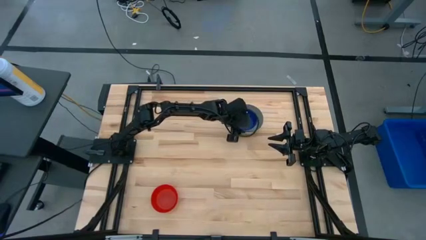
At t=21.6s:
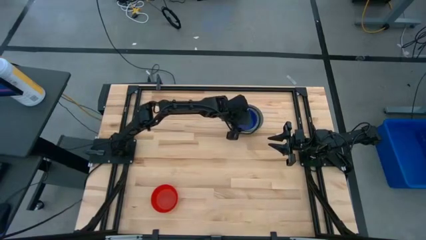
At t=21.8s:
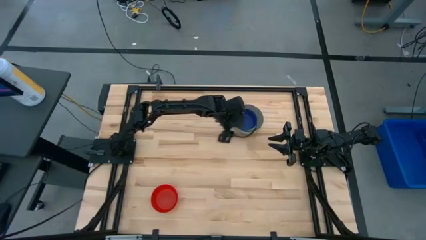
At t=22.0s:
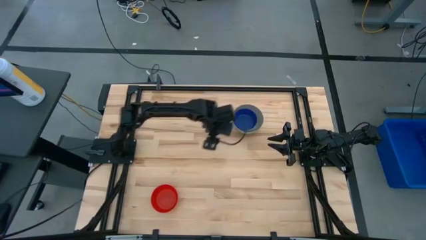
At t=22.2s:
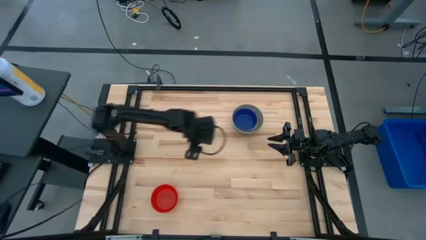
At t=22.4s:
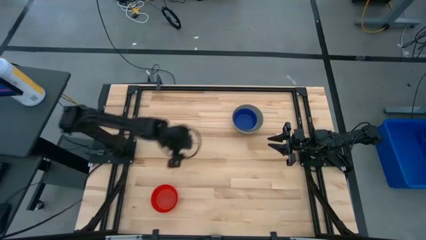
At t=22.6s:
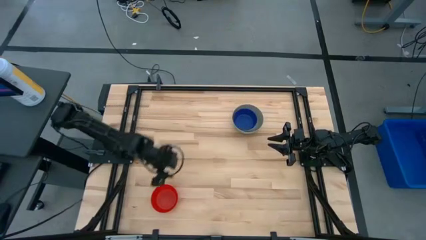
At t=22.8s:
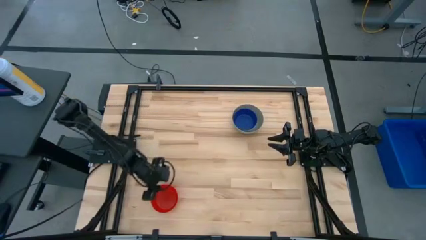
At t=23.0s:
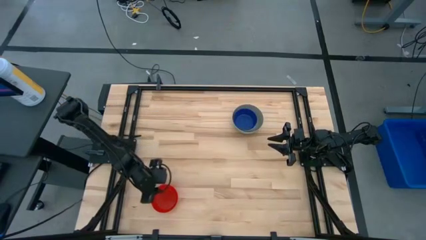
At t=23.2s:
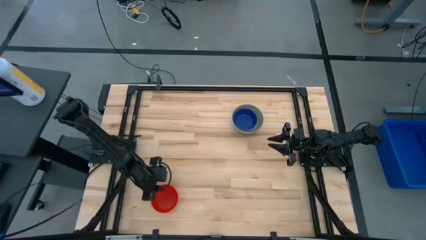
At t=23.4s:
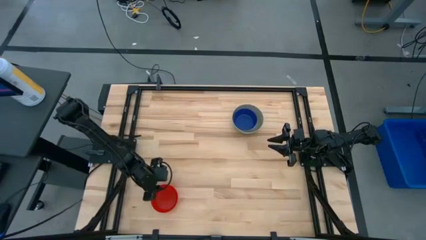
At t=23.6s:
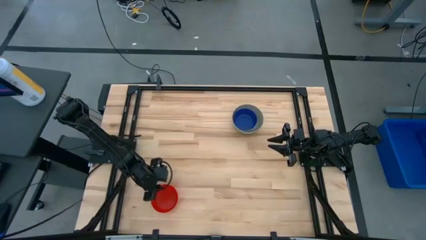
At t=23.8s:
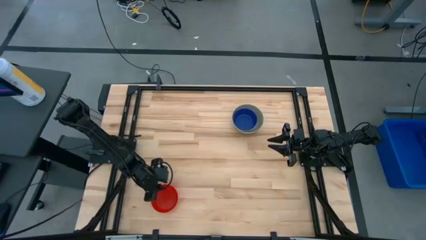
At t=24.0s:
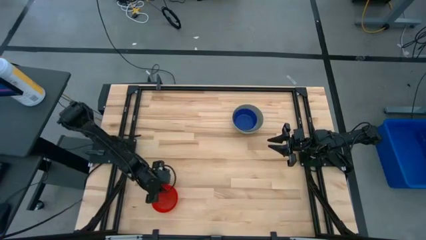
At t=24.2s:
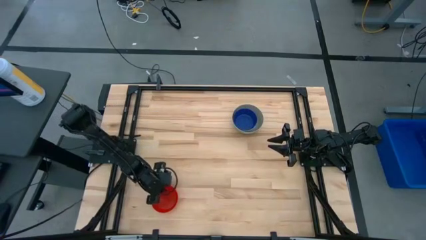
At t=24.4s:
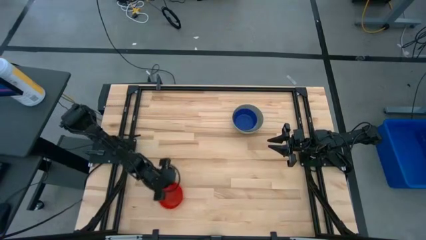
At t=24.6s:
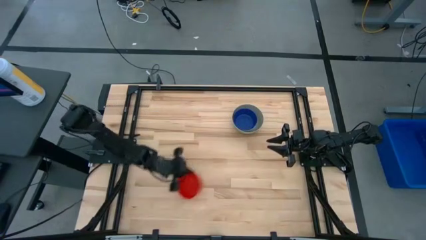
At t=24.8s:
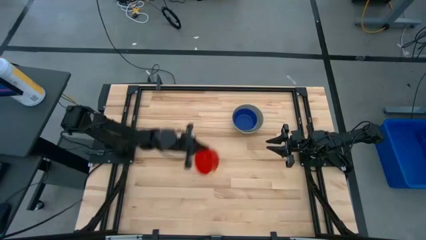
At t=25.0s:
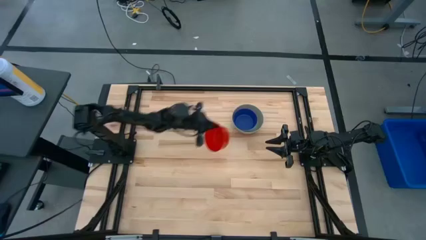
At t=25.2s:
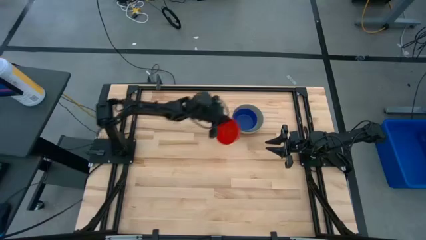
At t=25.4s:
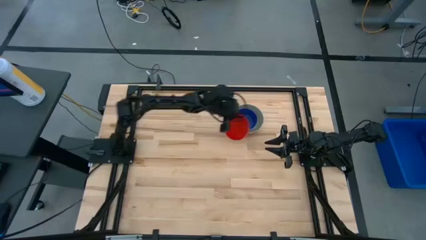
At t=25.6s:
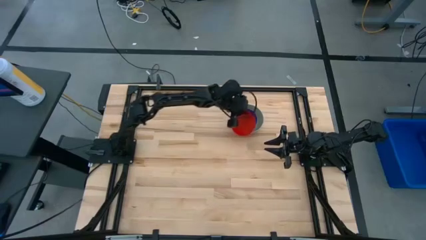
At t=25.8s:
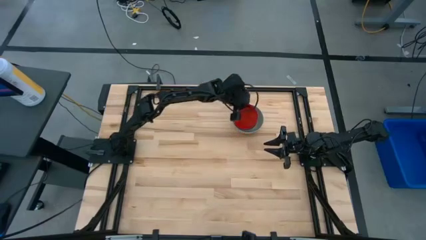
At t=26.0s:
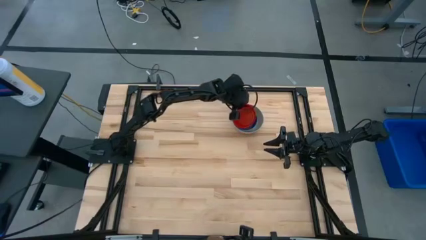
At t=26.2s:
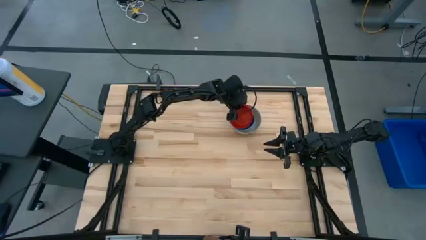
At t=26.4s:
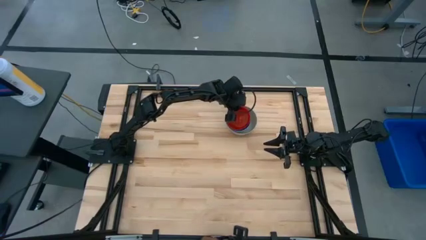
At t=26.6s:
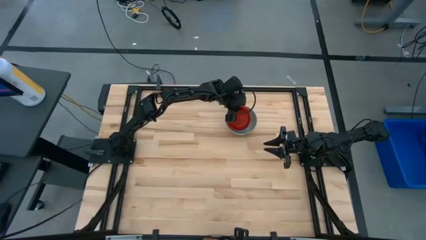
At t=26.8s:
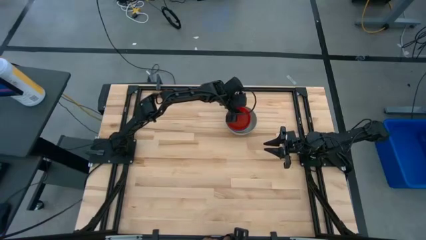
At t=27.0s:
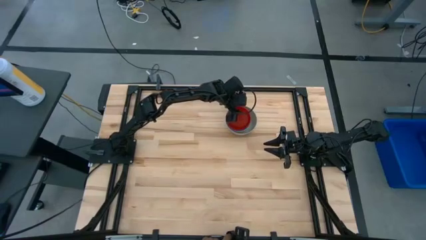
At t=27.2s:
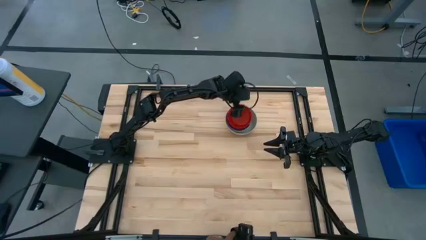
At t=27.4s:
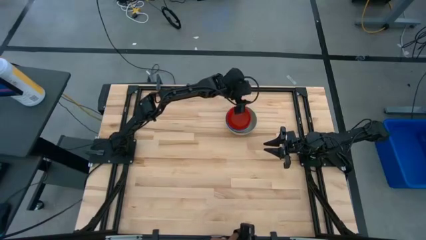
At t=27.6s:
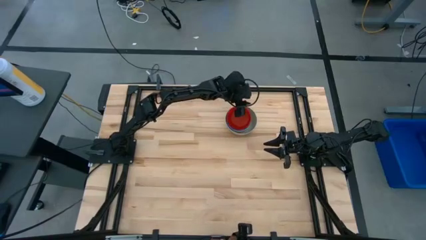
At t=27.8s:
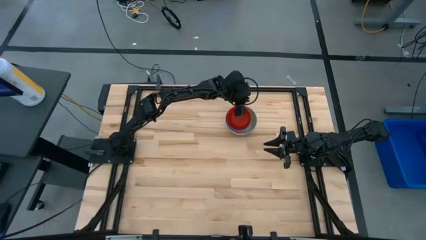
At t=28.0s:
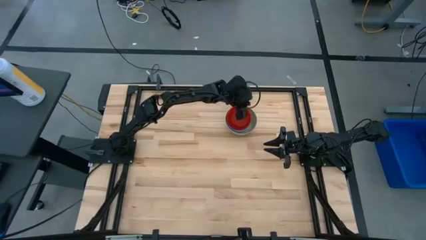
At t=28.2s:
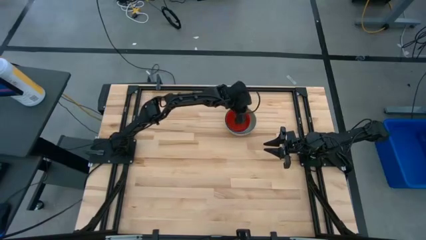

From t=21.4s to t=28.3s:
Stack the red bowl on the blue bowl

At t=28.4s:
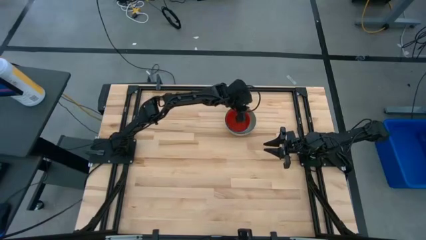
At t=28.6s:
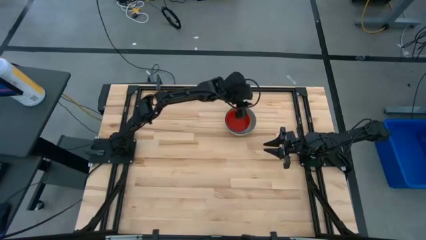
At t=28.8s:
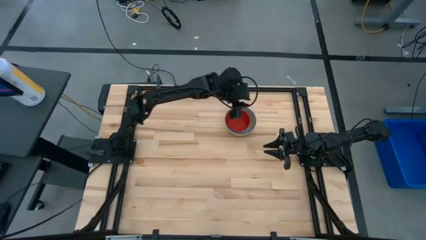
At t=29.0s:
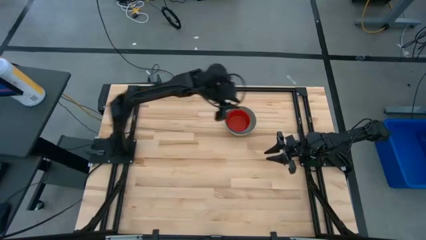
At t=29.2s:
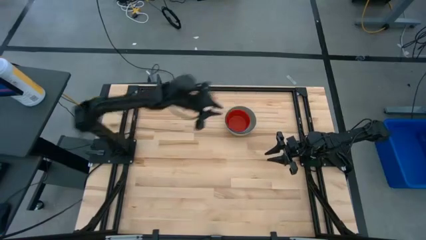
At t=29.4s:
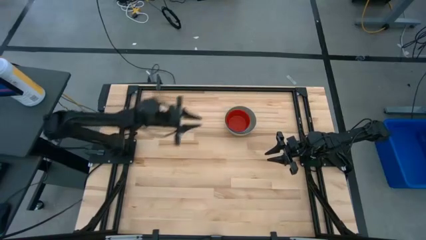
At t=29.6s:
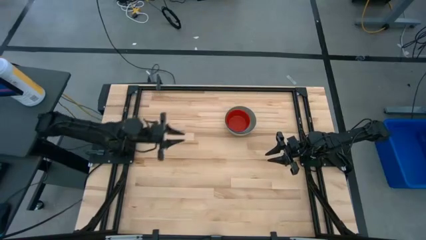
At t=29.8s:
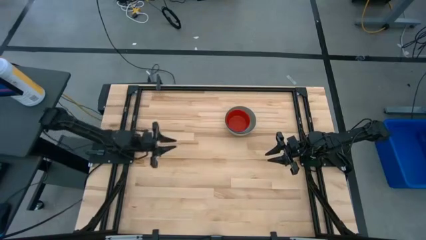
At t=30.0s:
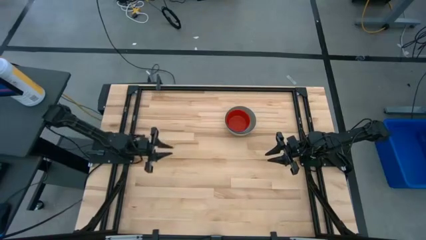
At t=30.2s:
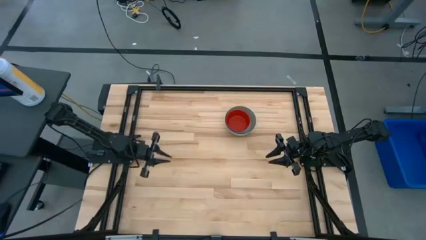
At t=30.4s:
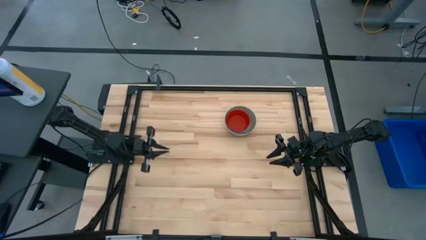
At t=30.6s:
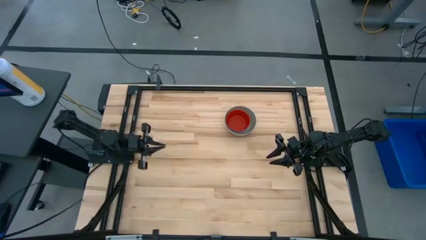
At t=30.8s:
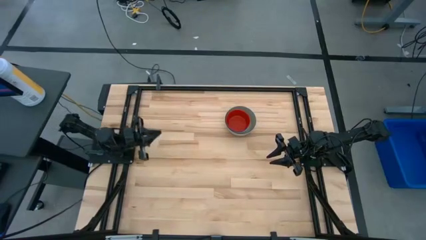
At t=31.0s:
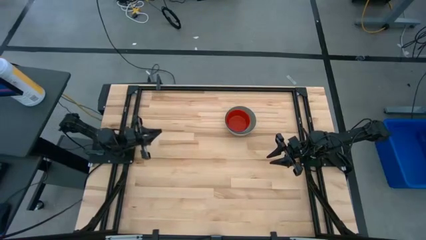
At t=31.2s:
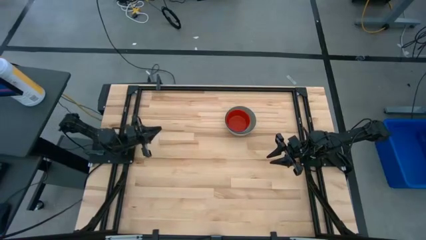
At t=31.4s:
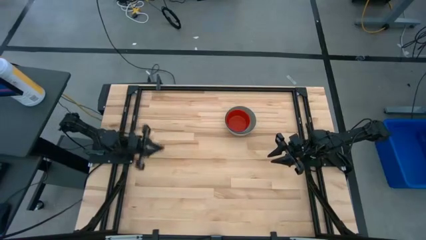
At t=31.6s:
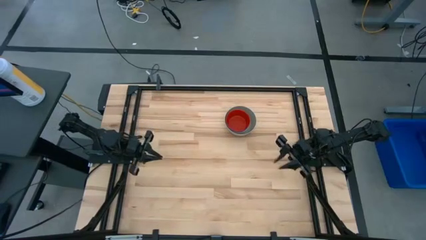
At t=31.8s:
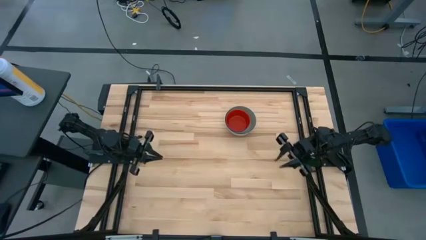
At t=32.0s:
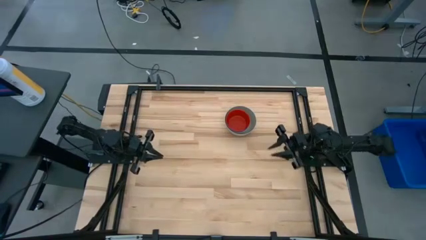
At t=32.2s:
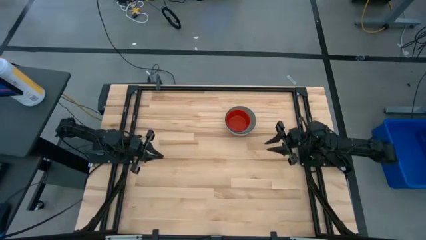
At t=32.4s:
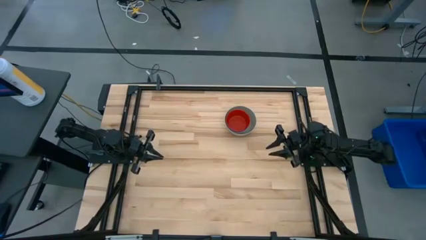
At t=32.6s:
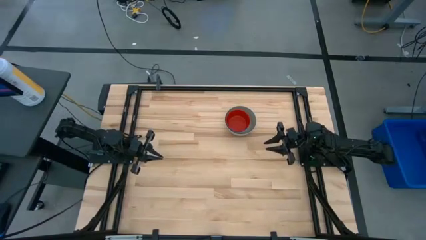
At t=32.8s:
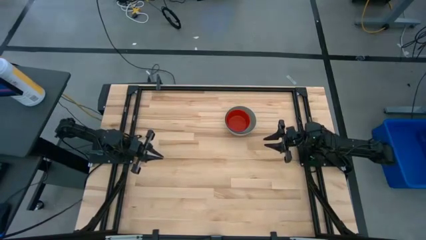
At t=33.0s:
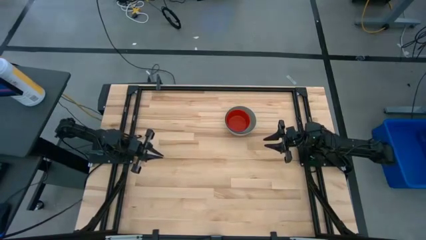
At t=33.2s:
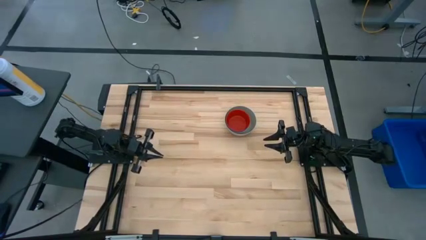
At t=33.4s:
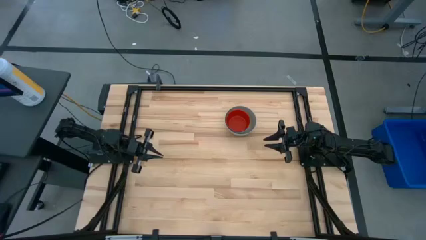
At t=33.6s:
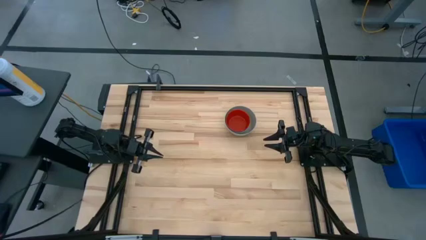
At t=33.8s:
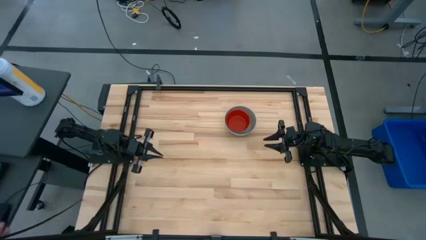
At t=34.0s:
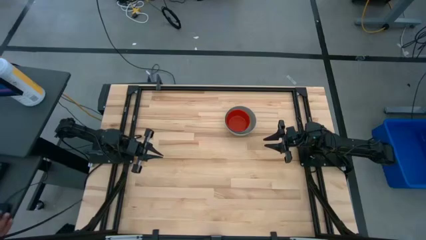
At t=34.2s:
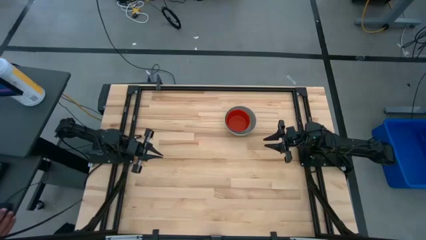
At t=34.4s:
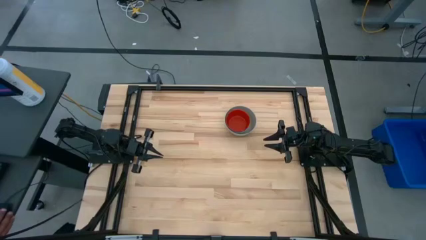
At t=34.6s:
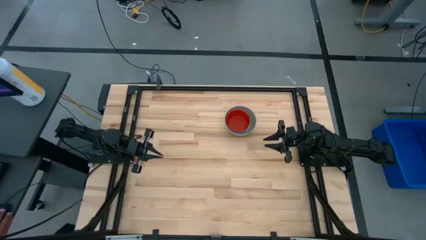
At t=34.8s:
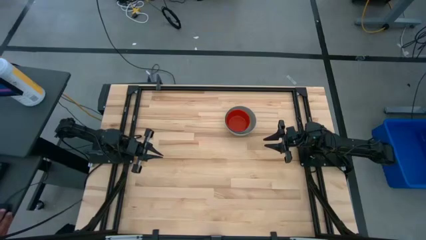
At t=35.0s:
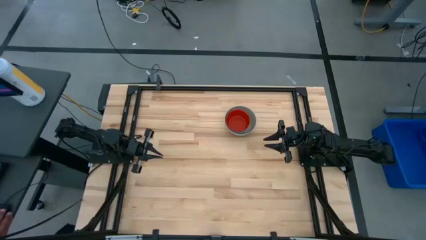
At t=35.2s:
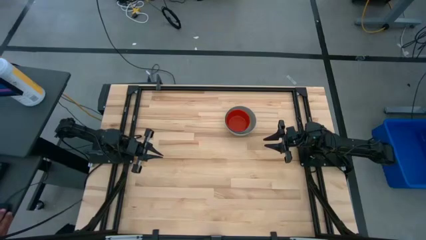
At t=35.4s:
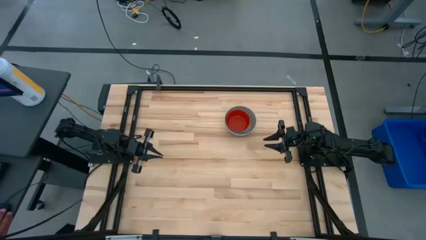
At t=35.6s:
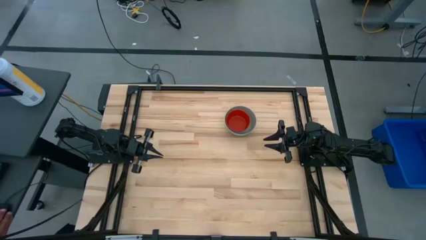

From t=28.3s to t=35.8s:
Return to Home Position
